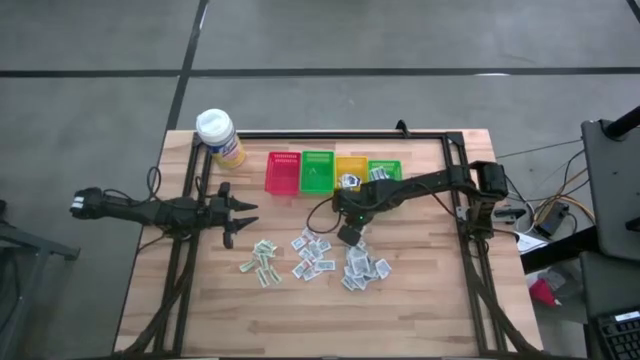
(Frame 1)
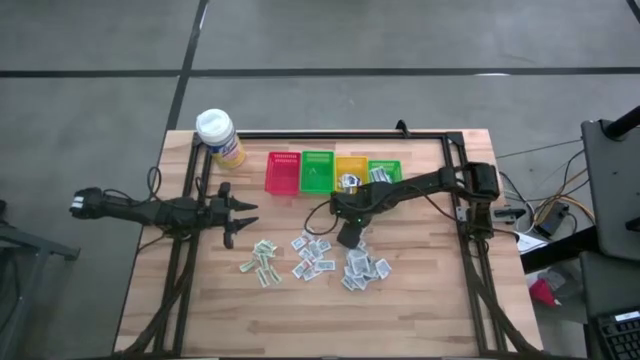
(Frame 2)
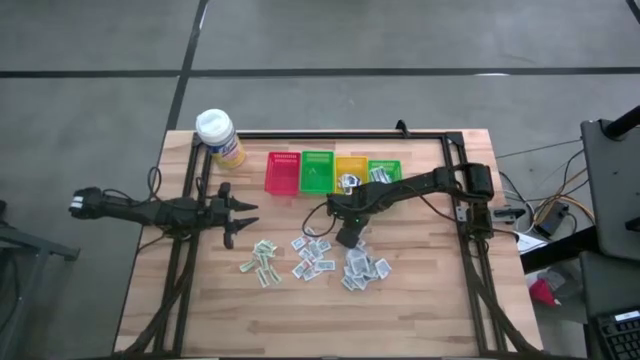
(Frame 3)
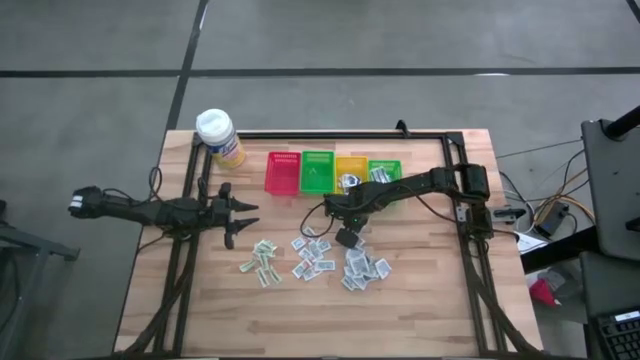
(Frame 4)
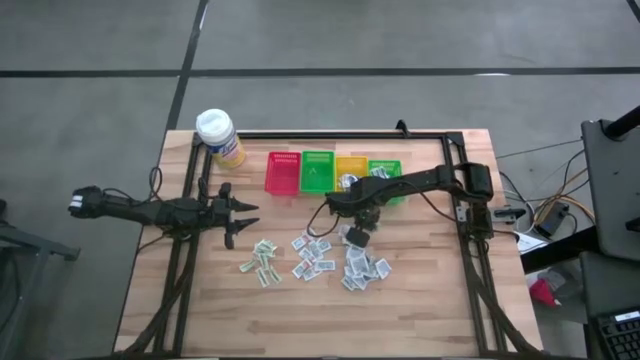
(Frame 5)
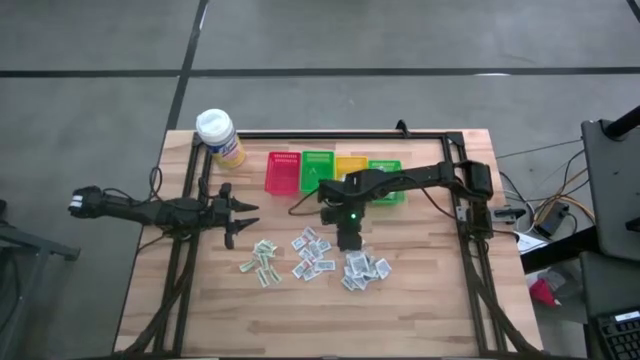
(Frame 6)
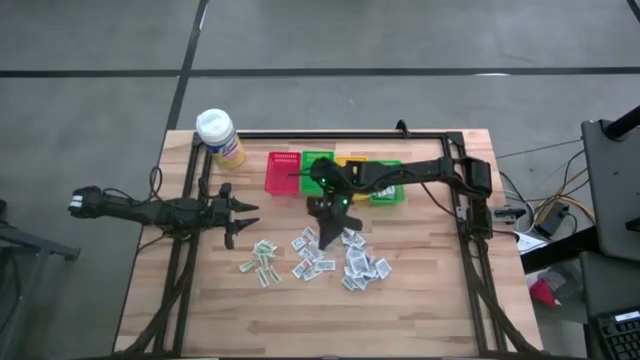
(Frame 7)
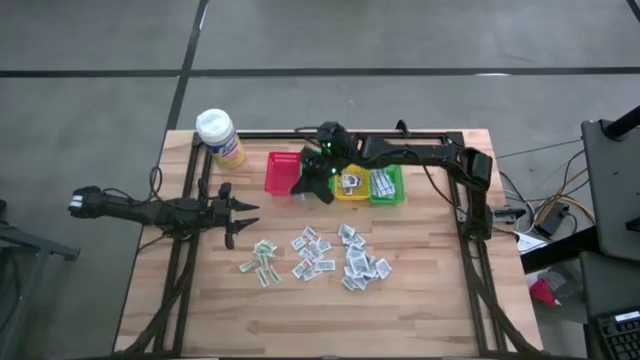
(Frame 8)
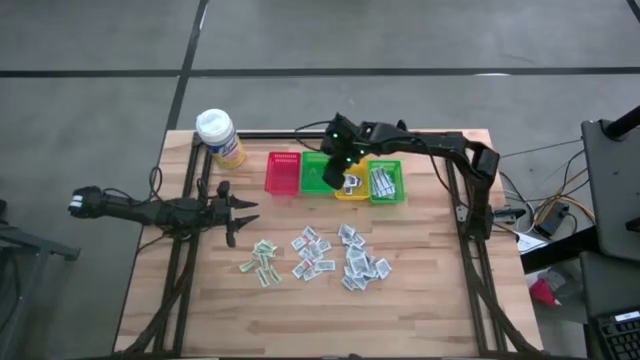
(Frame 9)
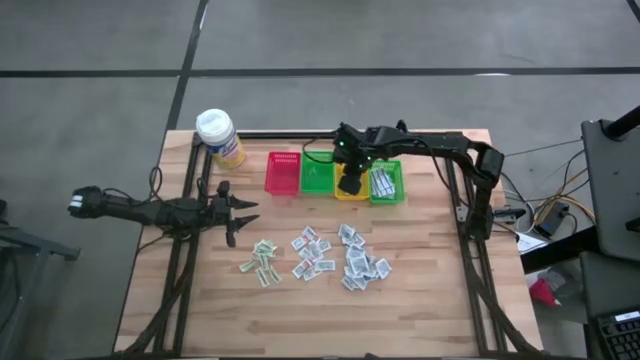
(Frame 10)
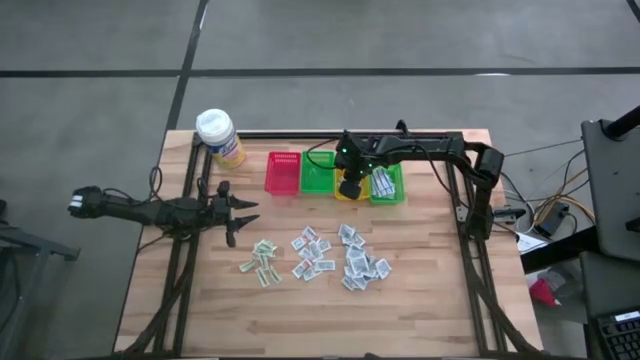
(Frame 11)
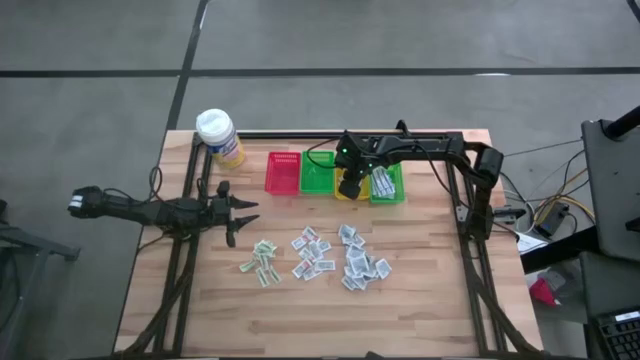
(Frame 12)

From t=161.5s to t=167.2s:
Task: Pick & Place First Aid Supplies
Put the blue alcohol pad into the yellow bin

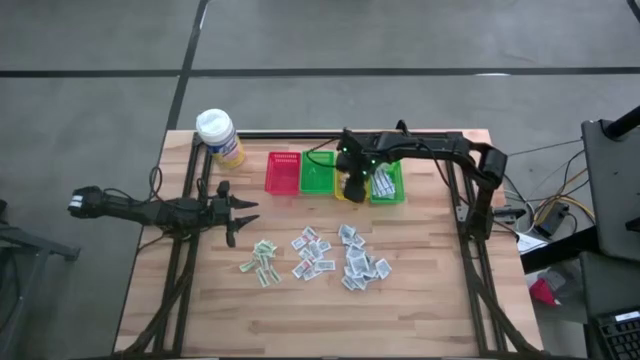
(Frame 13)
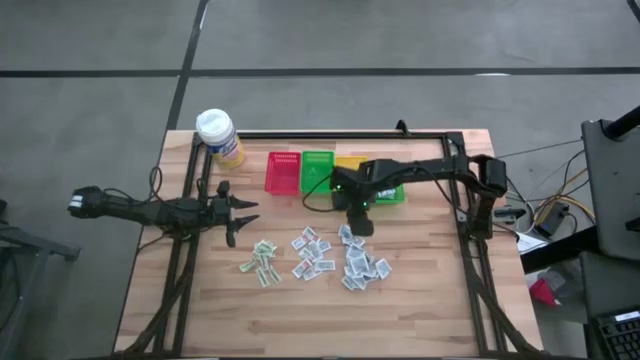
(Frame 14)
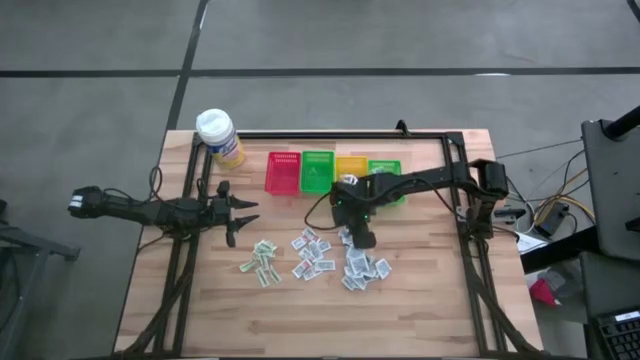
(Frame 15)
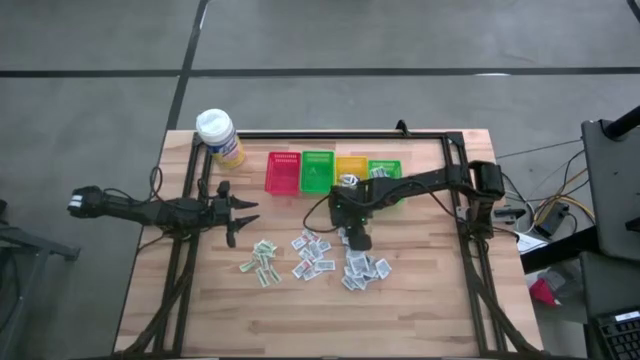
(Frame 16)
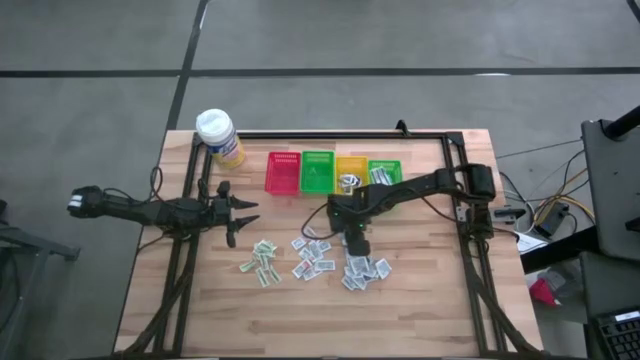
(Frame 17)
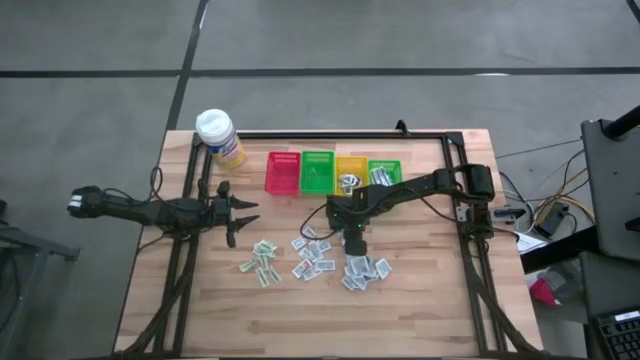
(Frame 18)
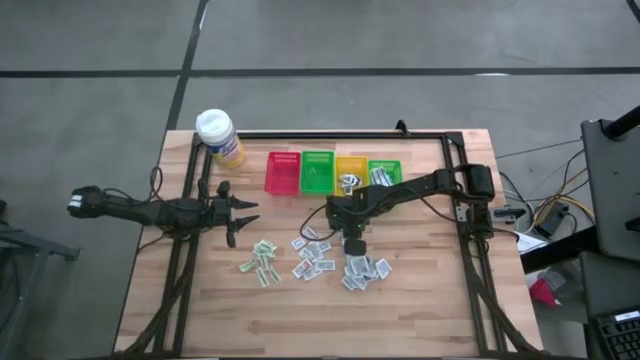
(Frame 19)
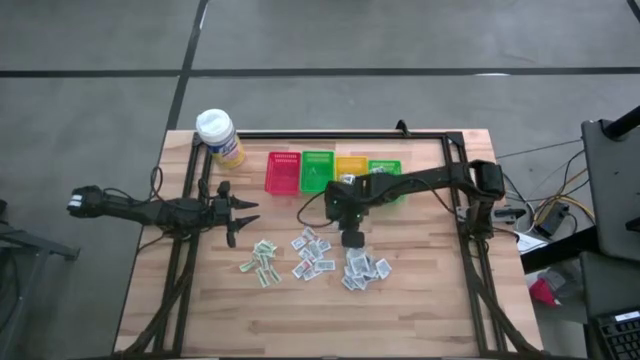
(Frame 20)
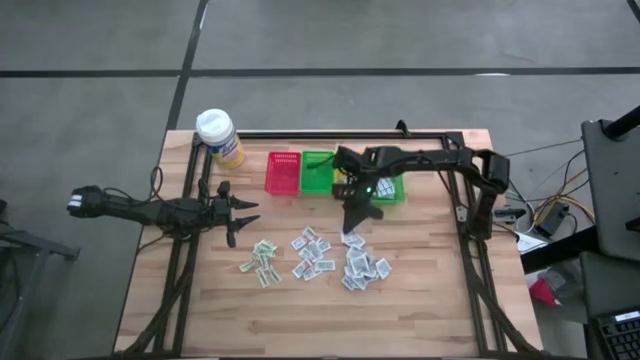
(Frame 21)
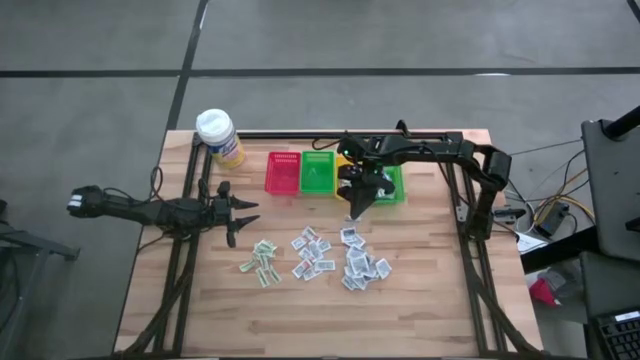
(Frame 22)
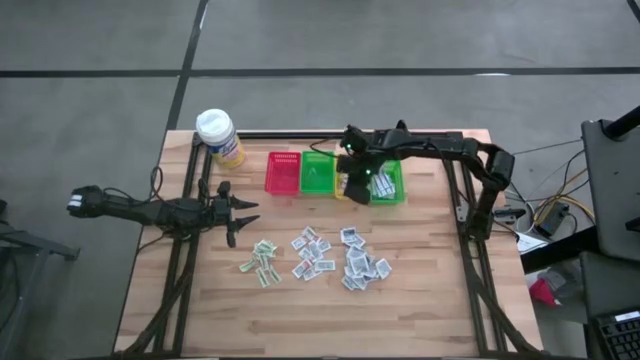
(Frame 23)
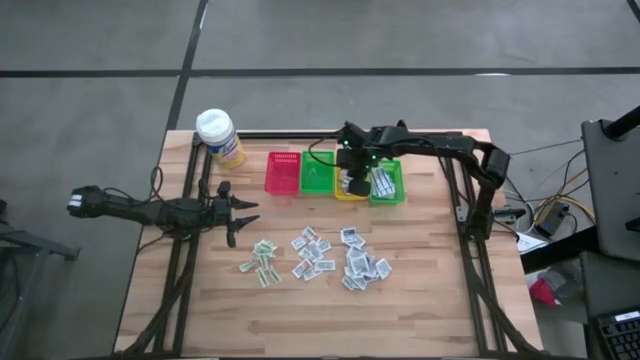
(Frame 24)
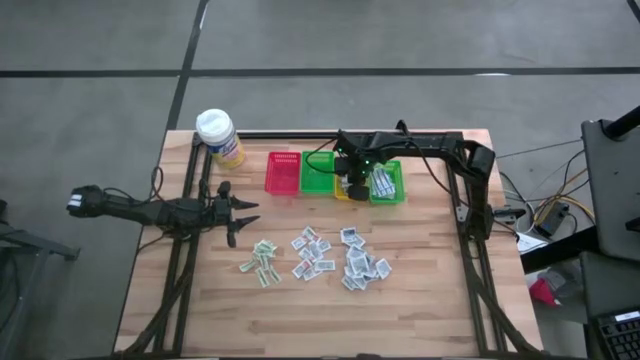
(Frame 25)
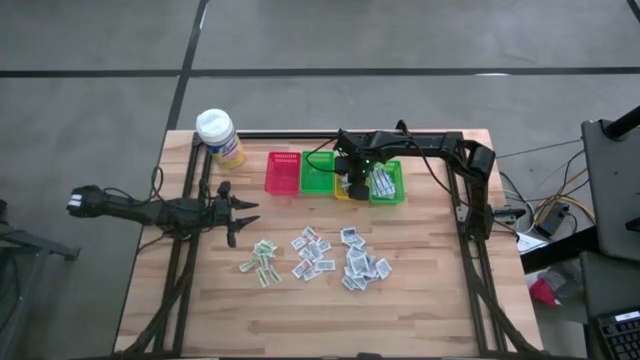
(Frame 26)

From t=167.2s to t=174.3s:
Put the blue alcohol pad into the yellow bin

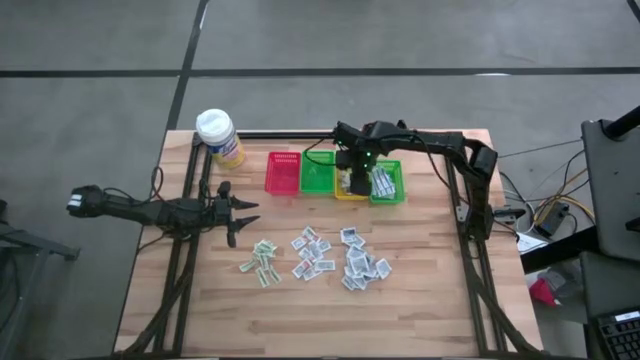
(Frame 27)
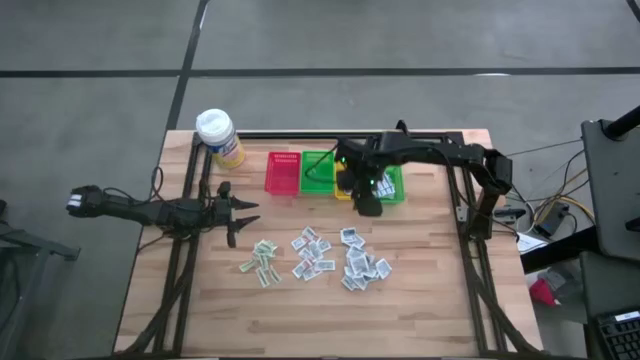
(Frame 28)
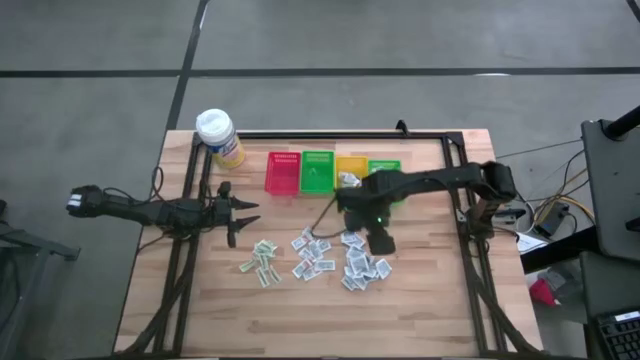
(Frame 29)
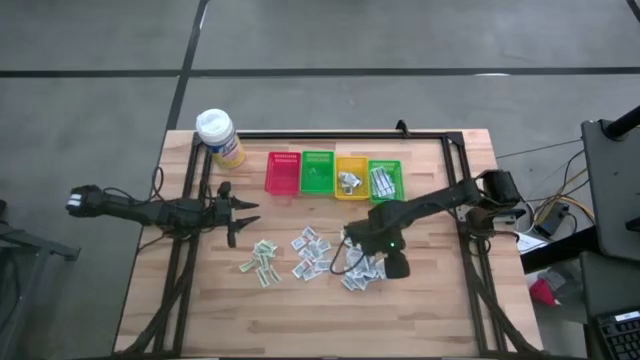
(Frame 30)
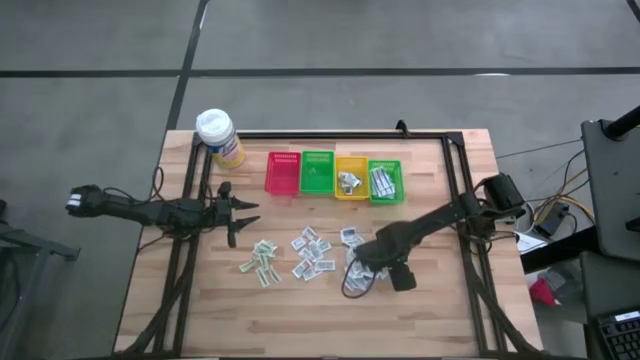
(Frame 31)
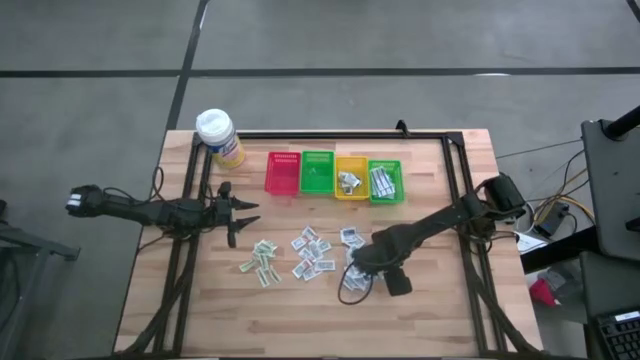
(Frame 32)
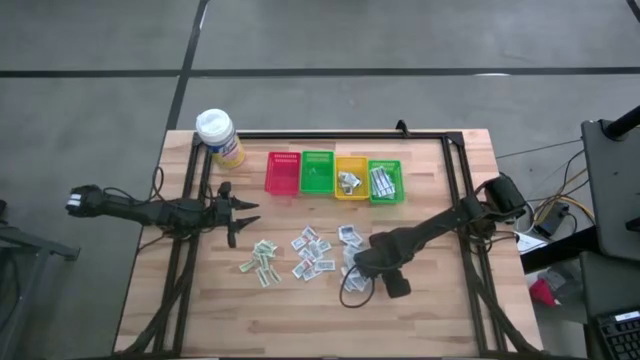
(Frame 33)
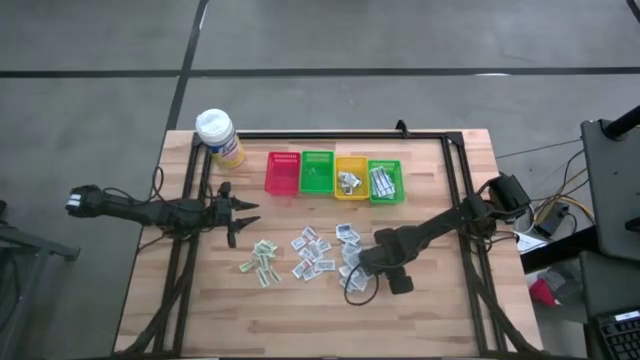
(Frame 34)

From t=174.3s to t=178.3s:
Adjust the blue alcohol pad on the table

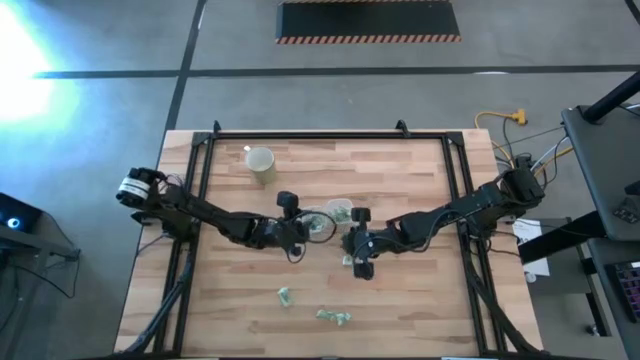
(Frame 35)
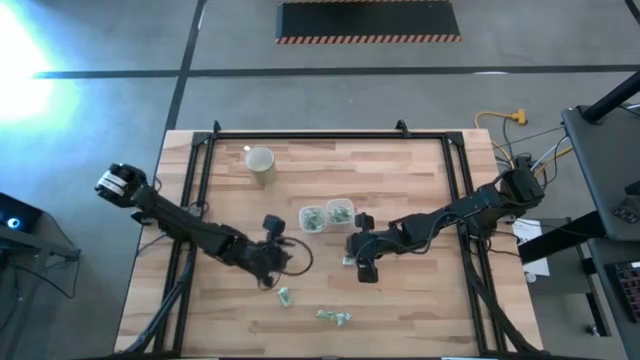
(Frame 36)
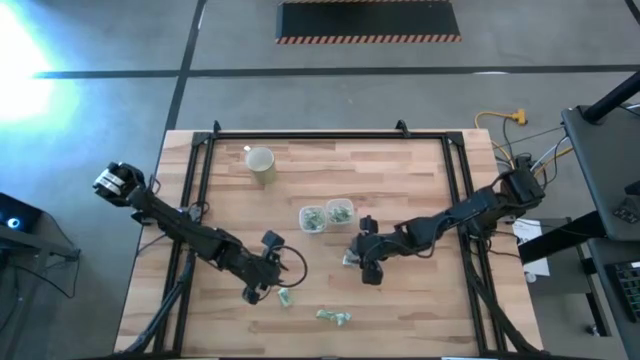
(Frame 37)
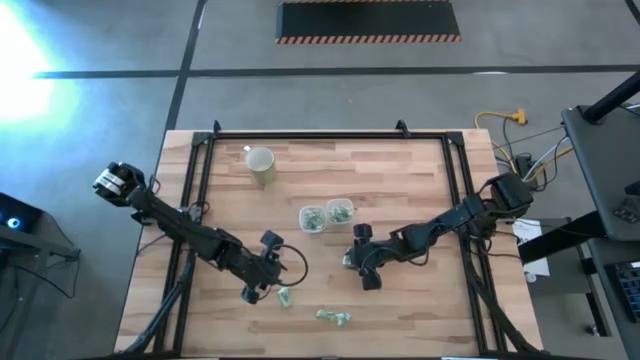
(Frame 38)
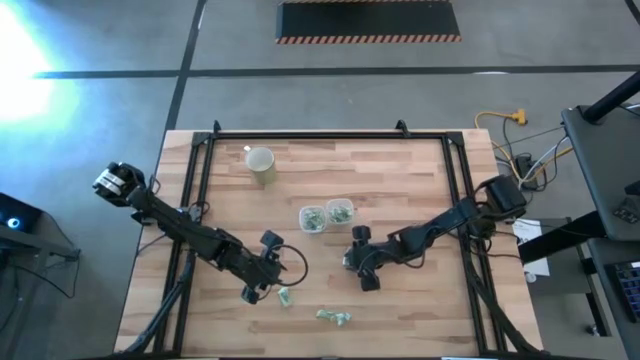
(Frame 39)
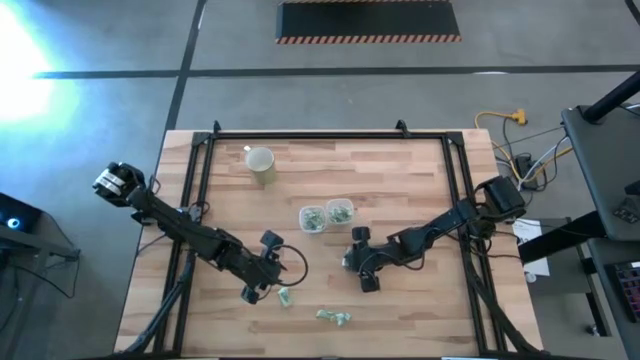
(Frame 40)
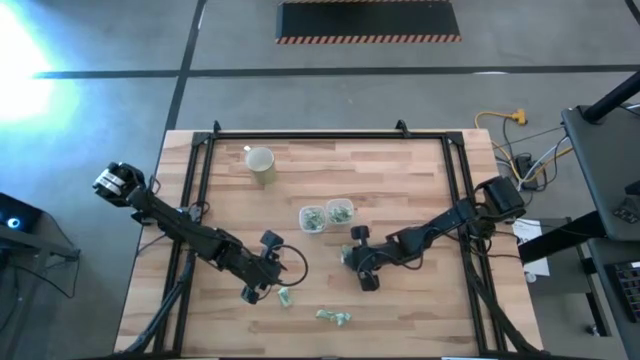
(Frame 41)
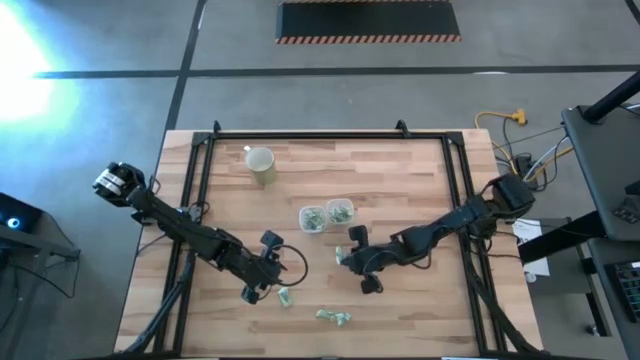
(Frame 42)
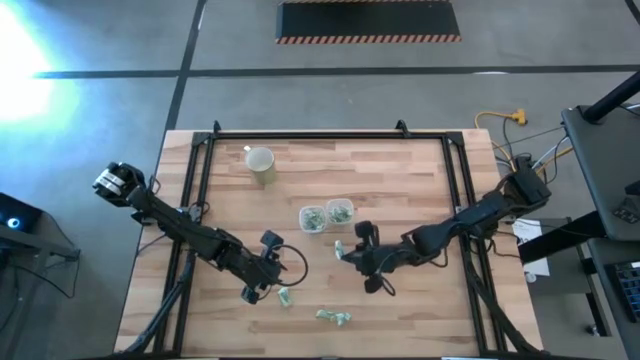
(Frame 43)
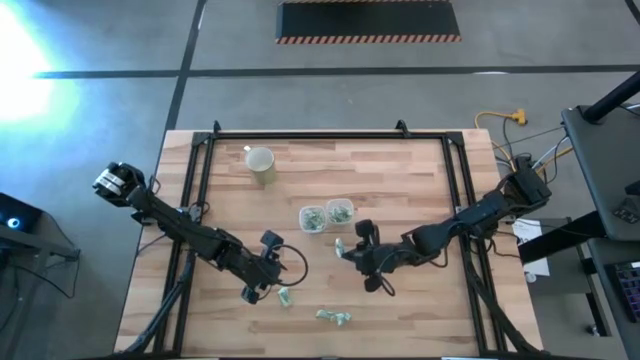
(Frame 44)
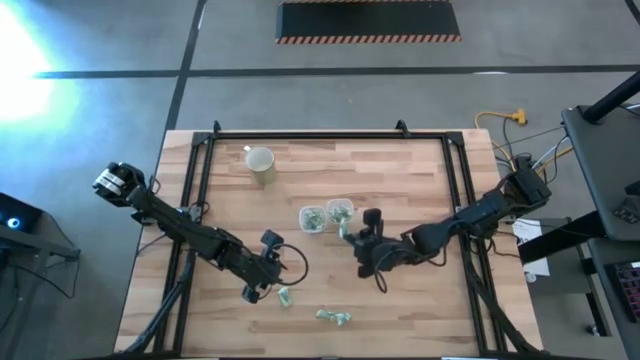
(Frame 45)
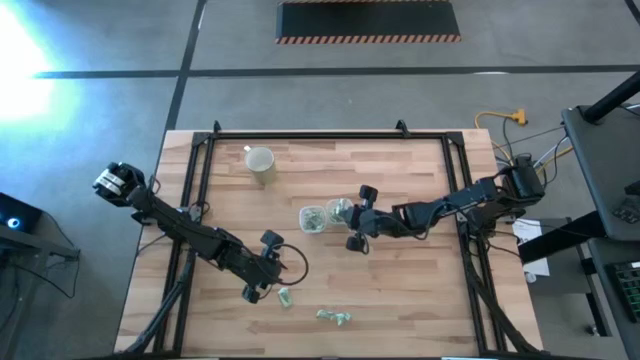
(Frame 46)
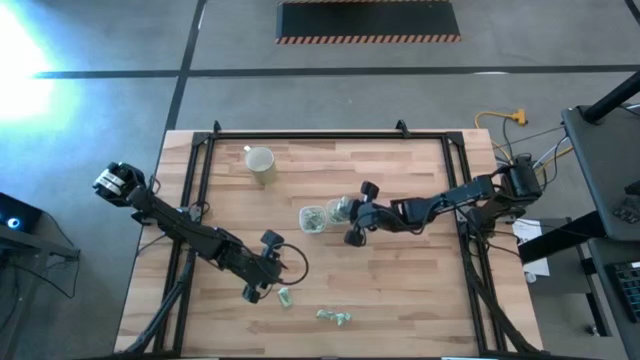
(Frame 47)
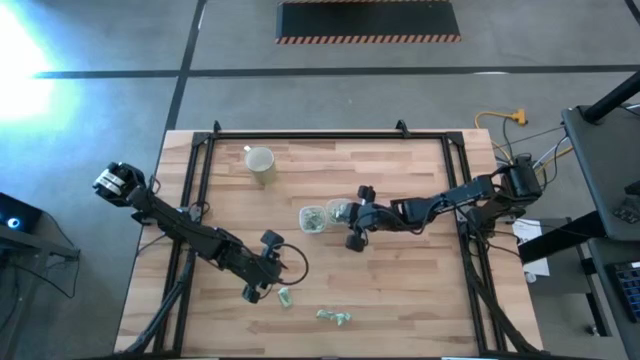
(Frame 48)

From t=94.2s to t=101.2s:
Task: Pick and place items into bin
Put the stevia packet into the right transparent bin
